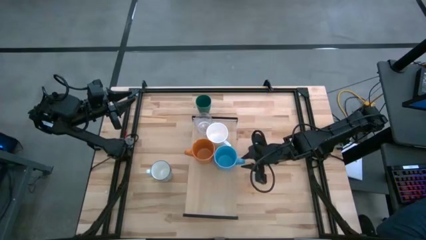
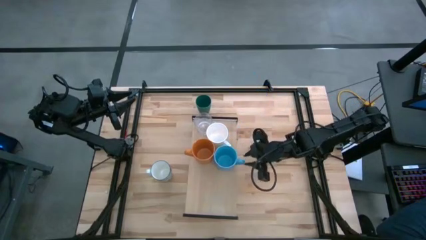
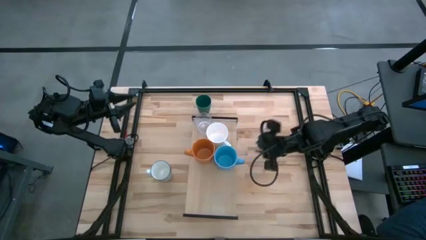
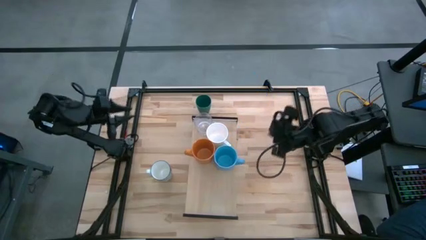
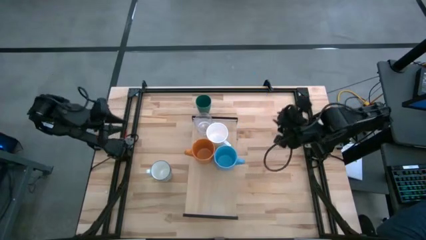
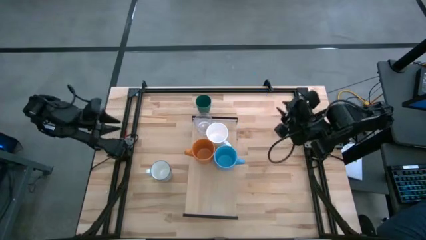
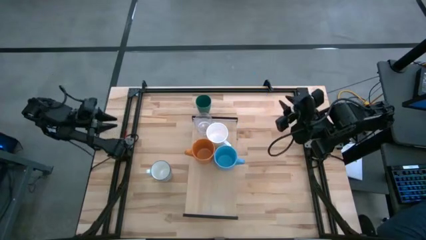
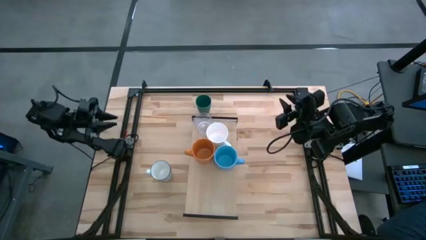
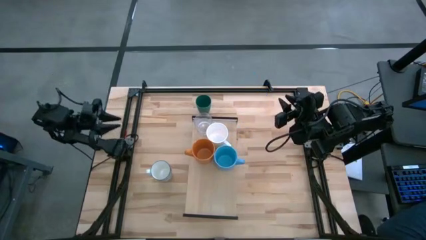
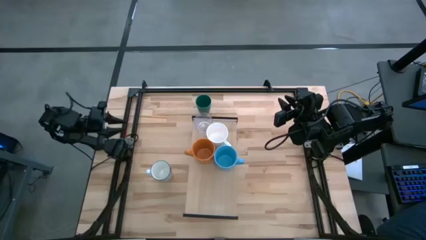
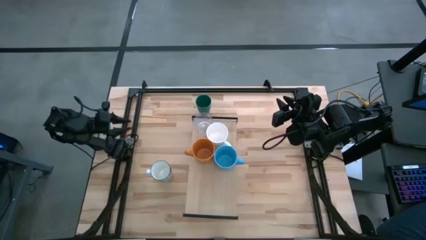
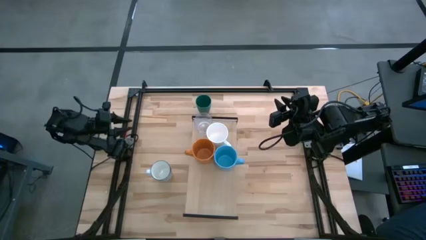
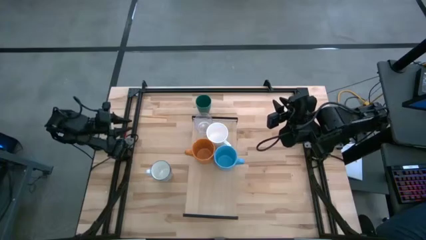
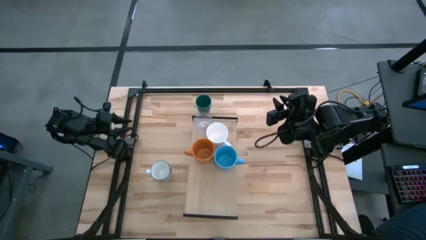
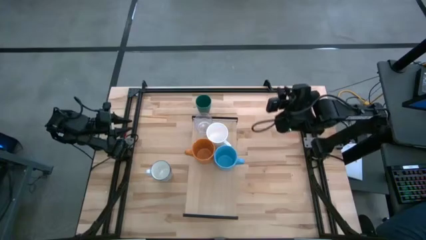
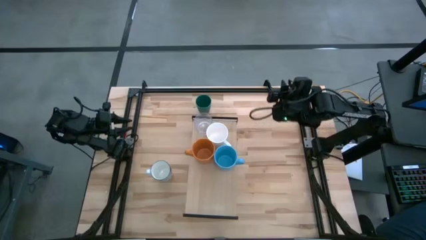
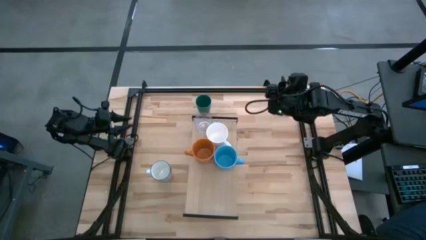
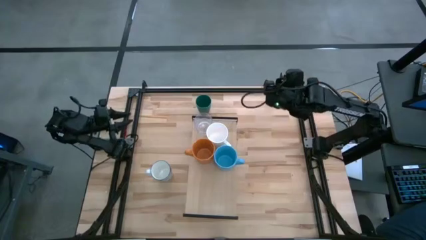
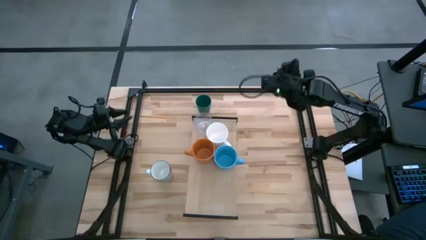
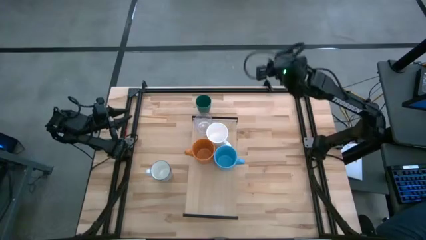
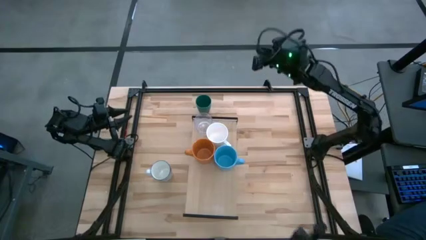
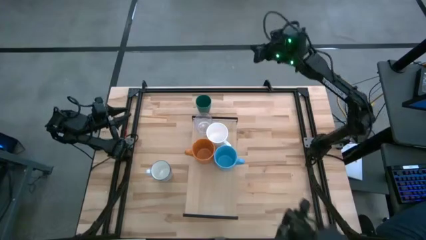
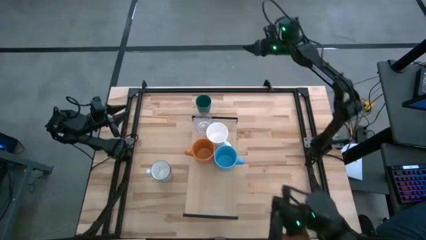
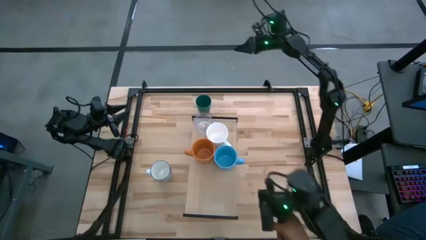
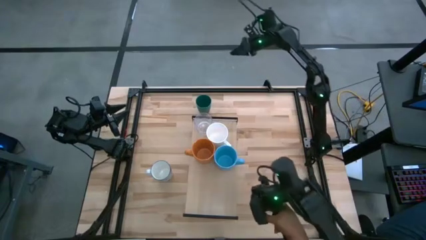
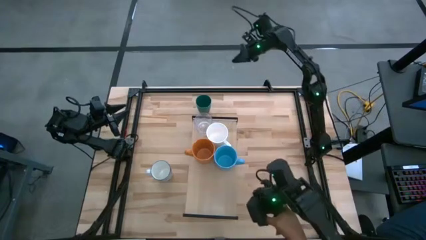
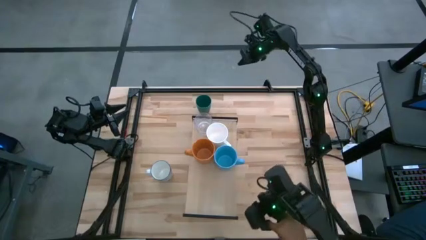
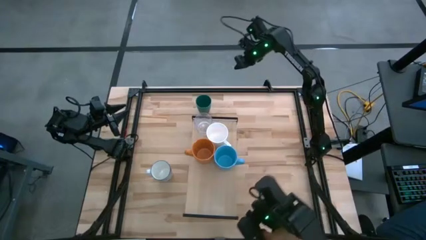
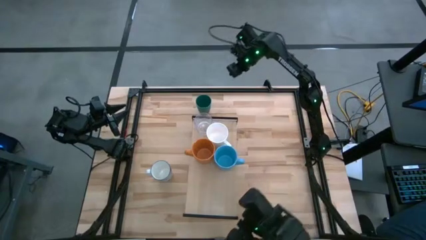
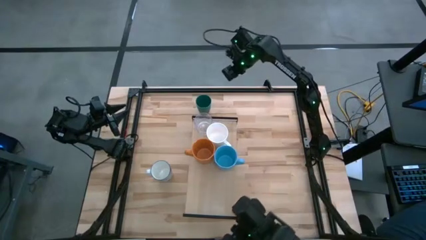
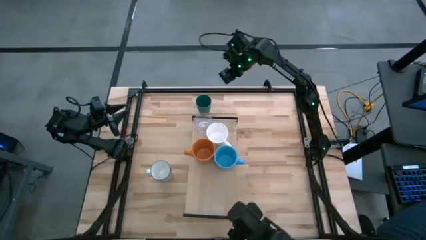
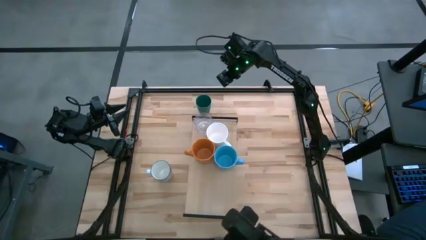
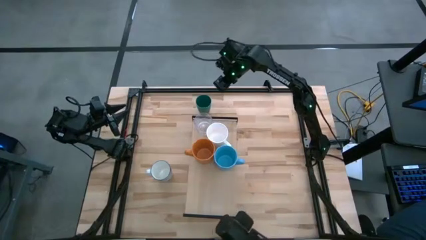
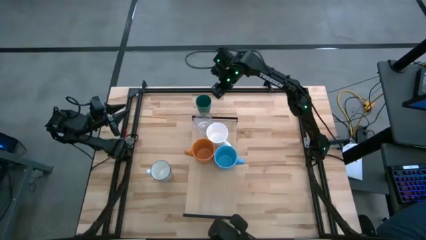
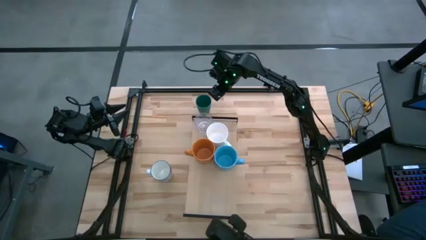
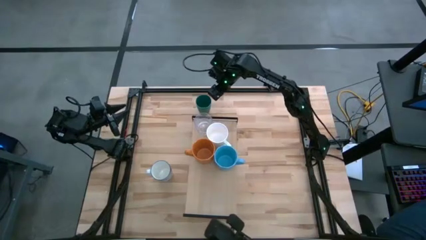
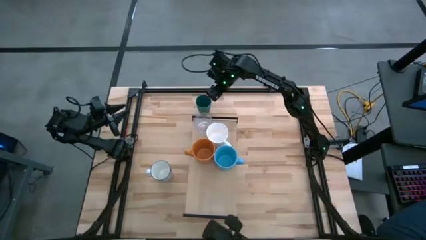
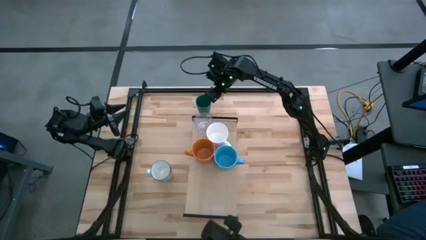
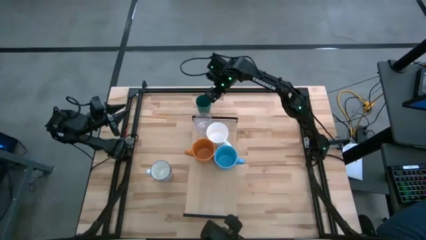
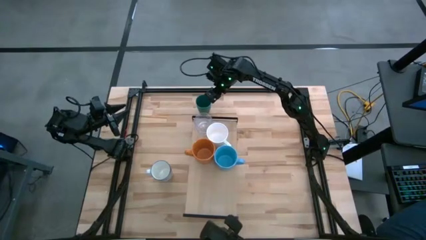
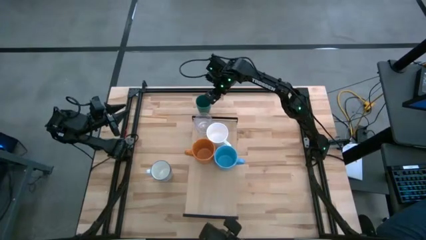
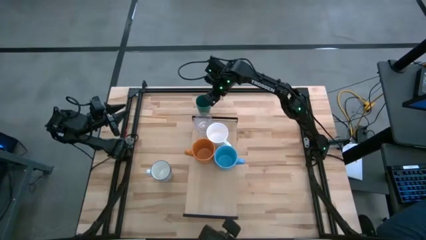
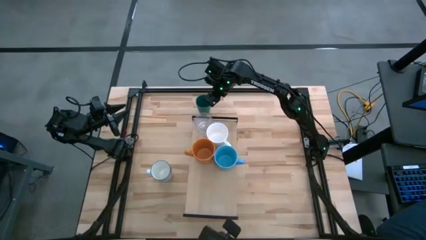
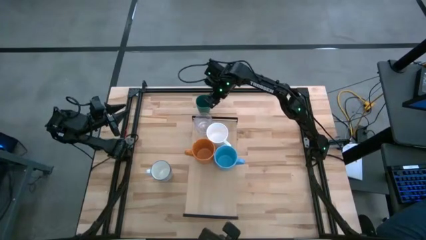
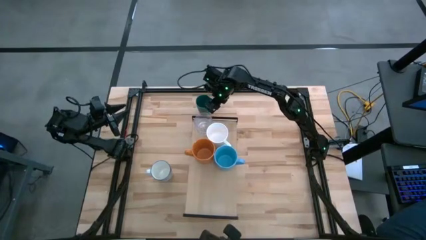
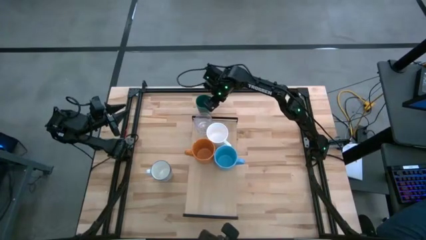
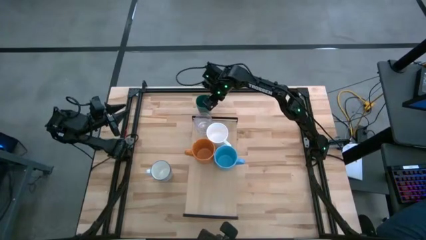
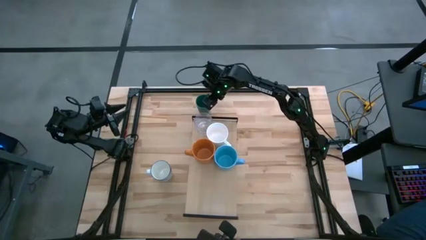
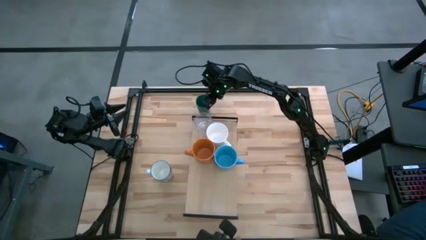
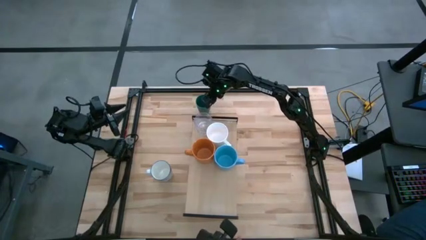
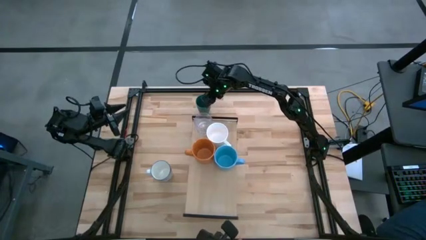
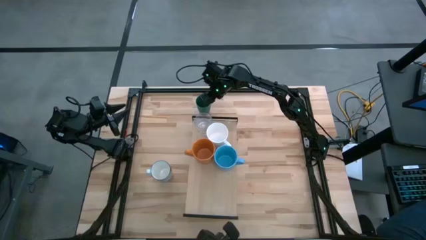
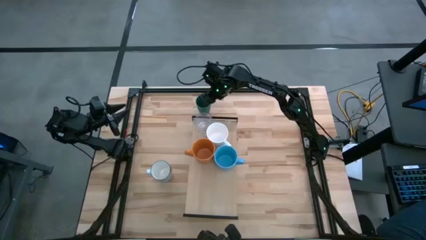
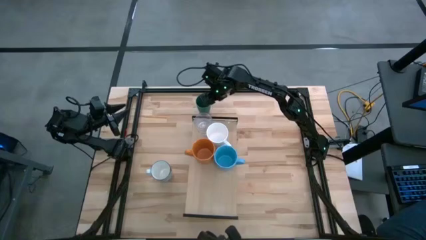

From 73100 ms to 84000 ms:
Task: Stack small to large cups/mugs on shelf
Put the green cup on the shelf

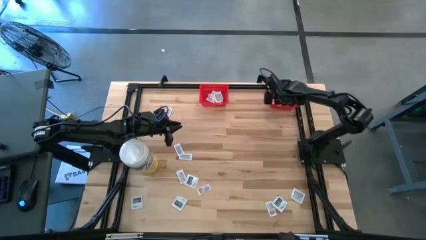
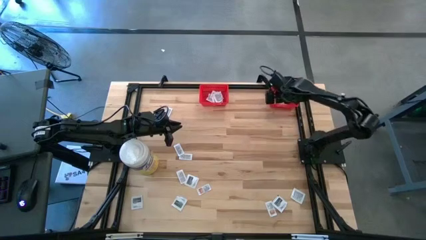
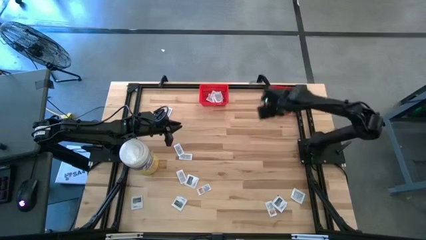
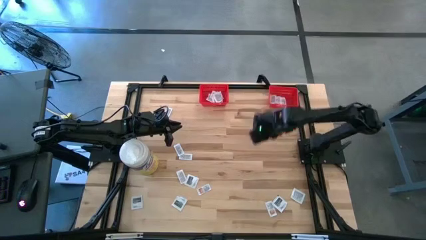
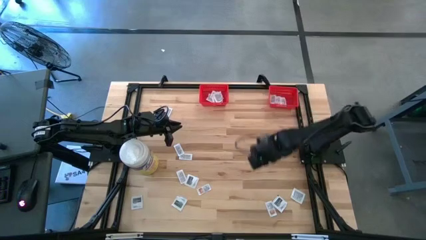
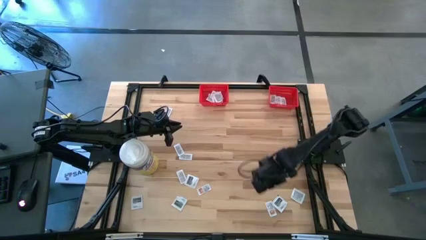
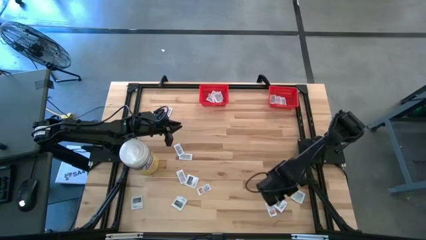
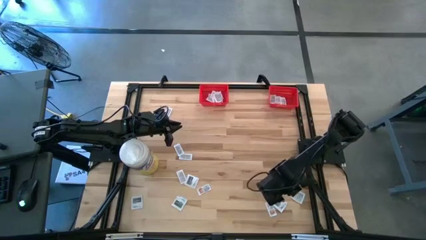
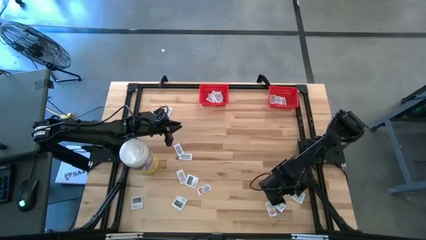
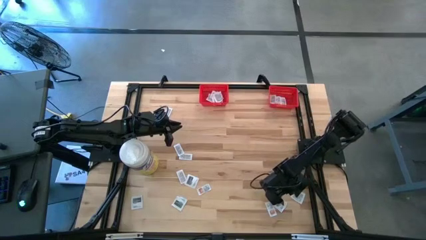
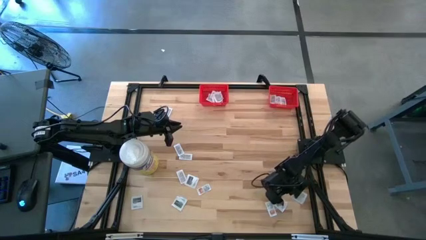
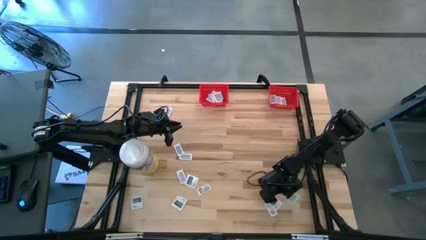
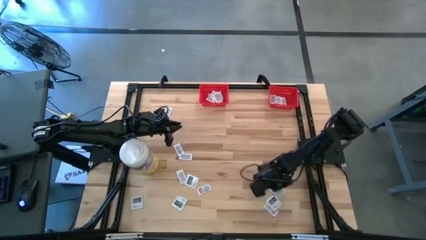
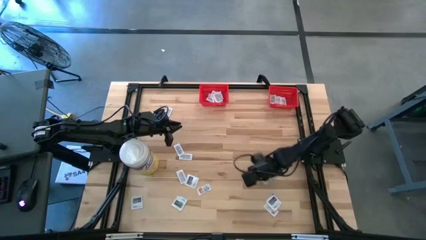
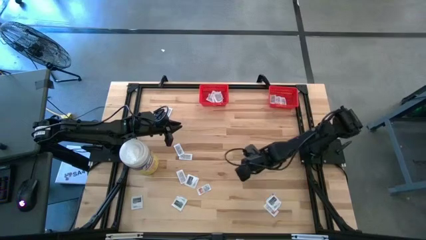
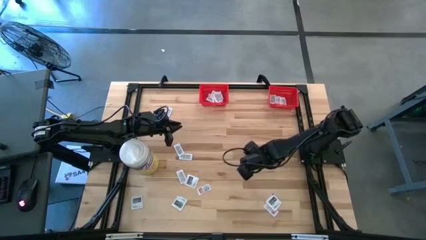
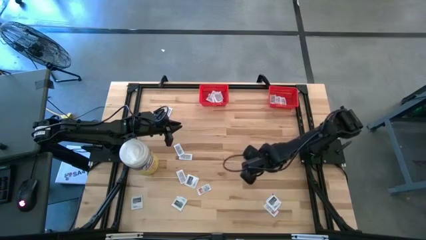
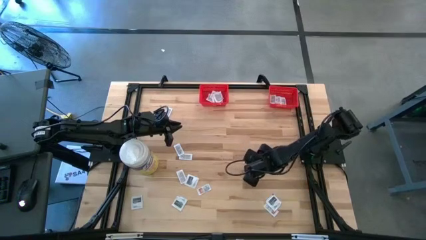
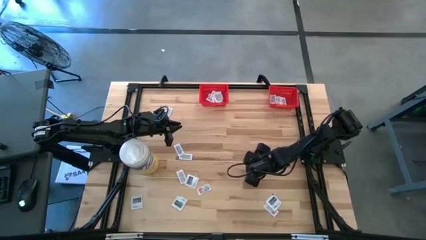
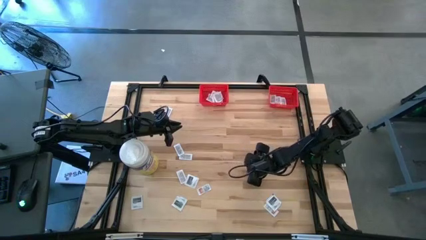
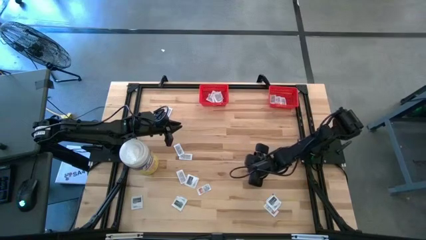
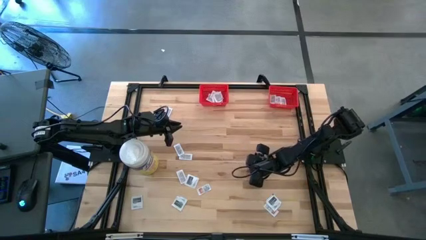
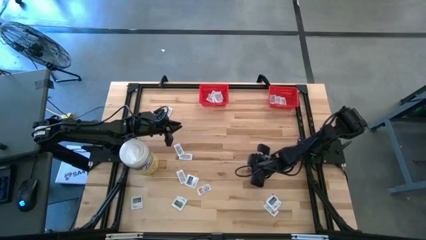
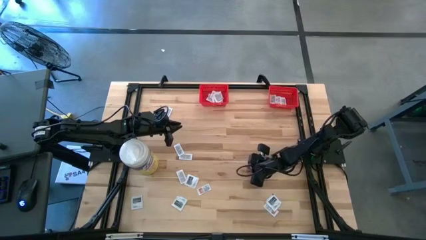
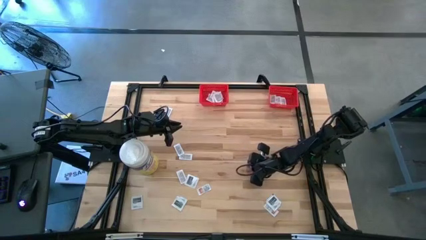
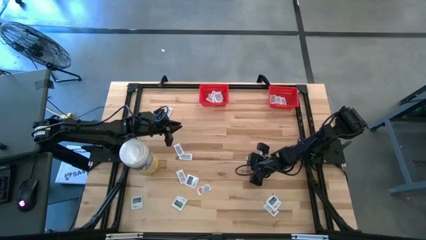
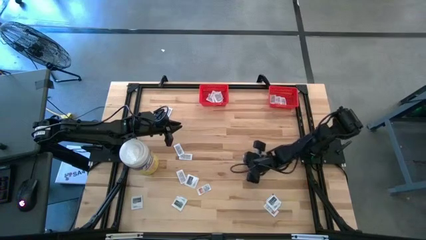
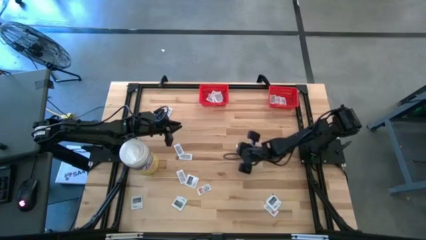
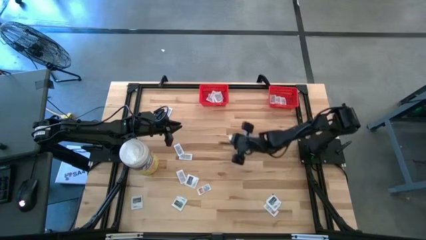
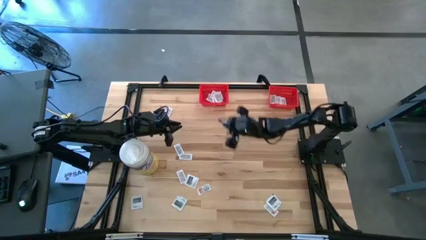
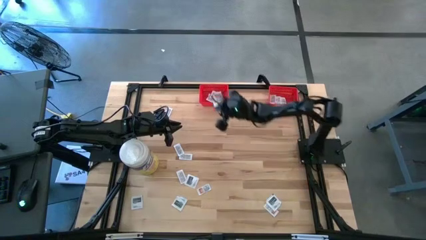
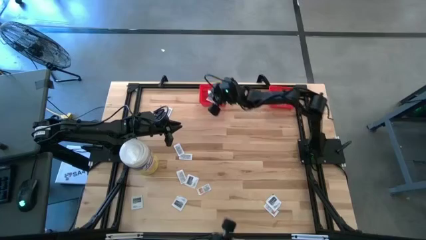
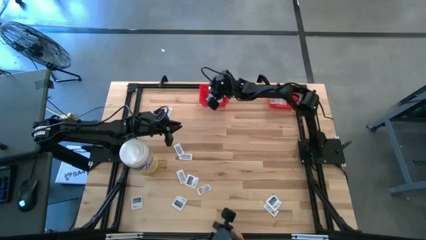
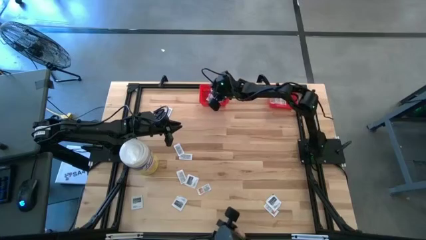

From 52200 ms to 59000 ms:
Task: Pick & Place First Aid Supplies
Put the towelette pack into the left red bin
